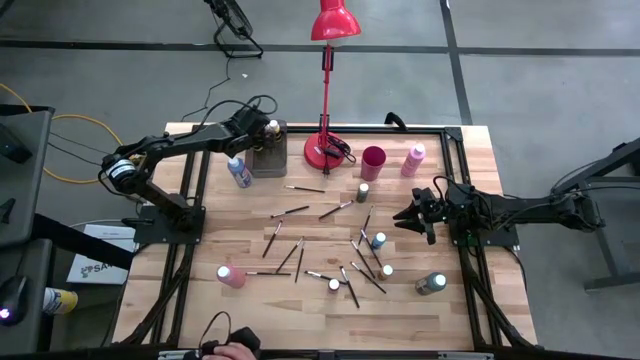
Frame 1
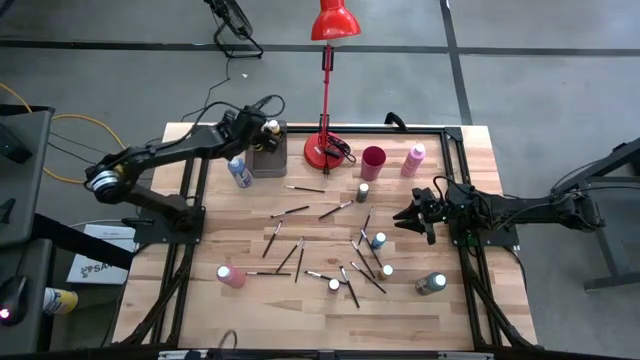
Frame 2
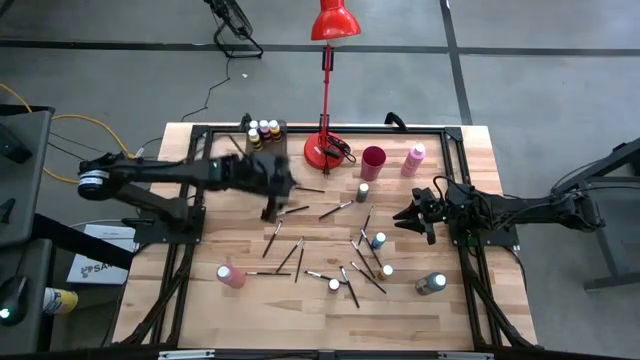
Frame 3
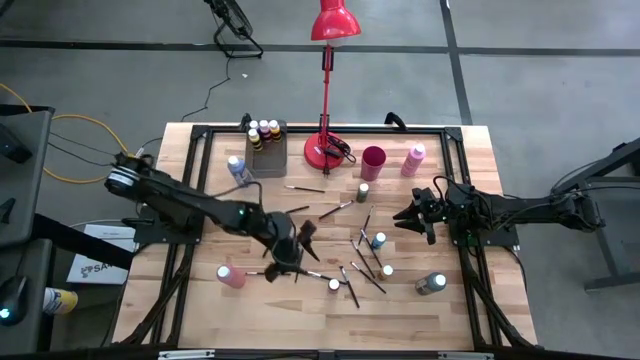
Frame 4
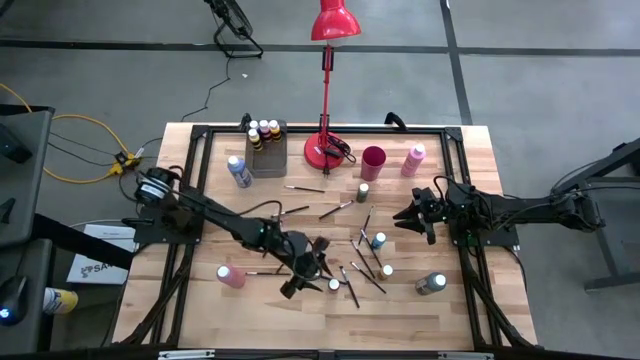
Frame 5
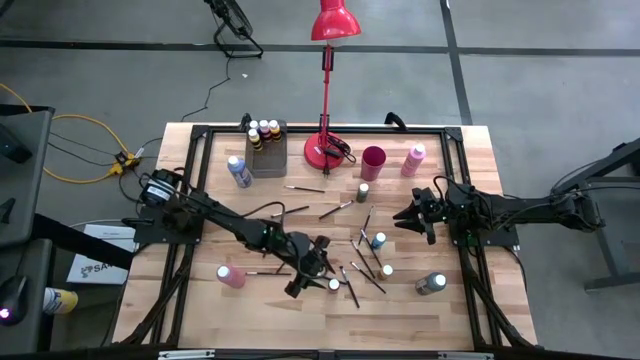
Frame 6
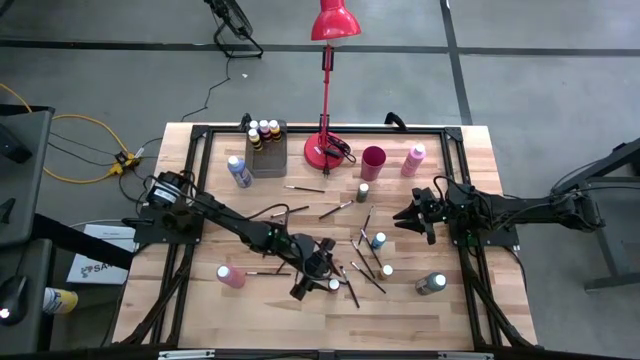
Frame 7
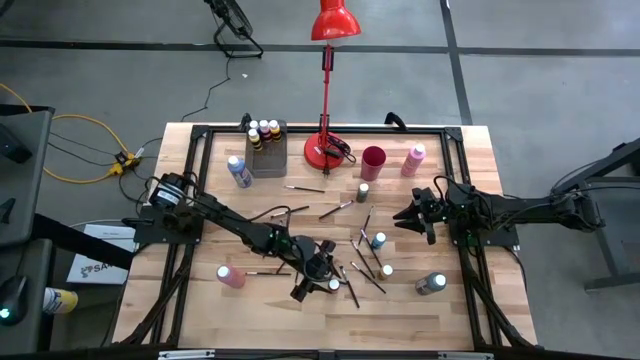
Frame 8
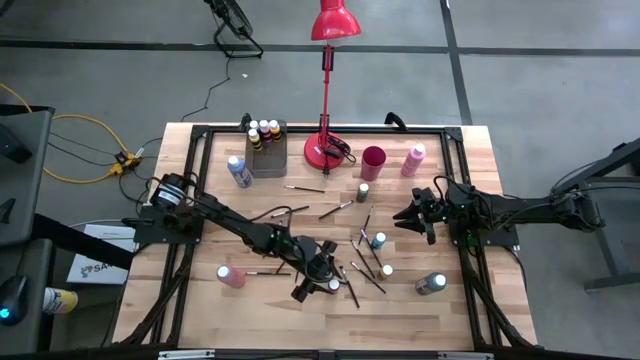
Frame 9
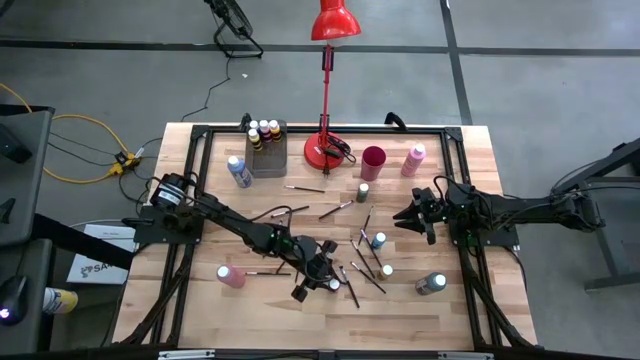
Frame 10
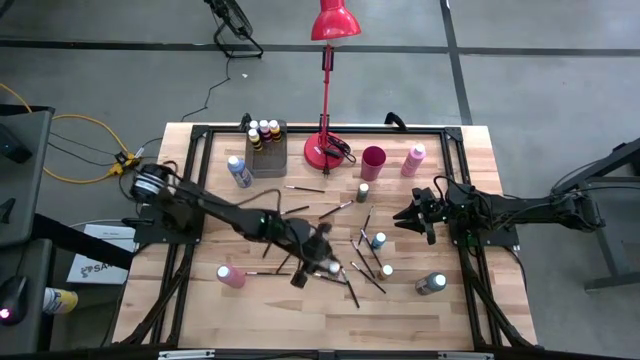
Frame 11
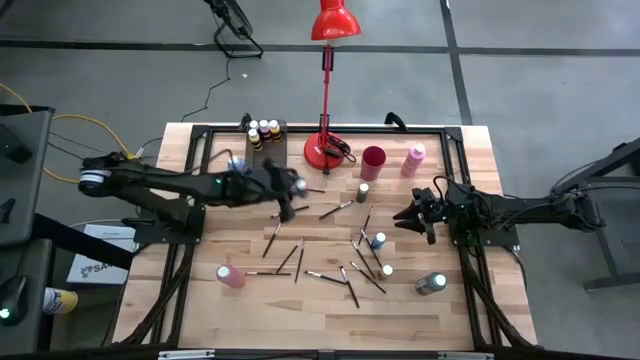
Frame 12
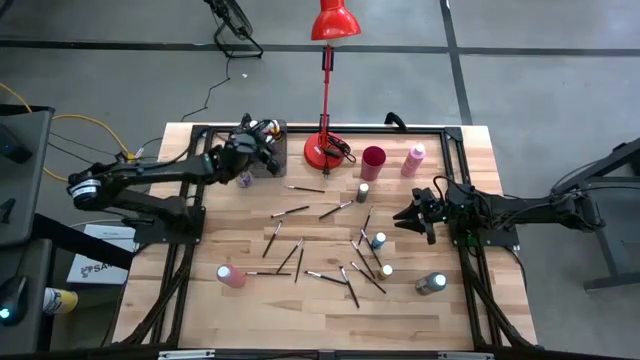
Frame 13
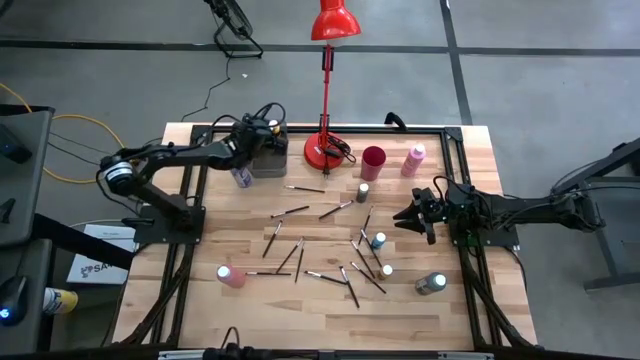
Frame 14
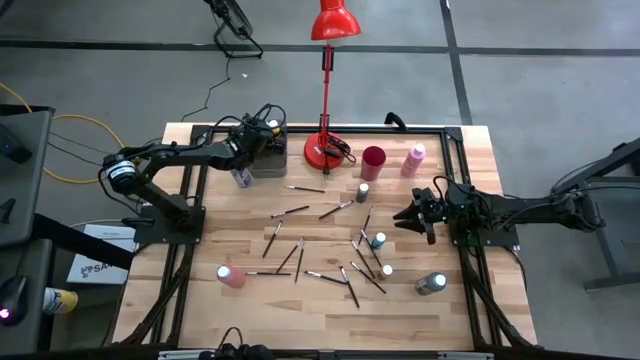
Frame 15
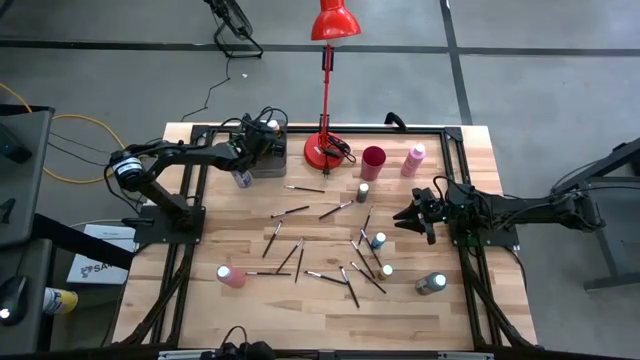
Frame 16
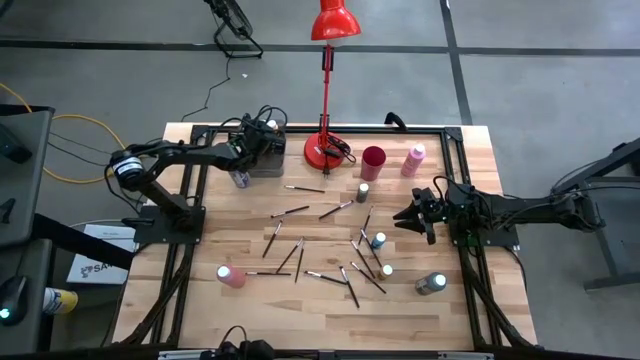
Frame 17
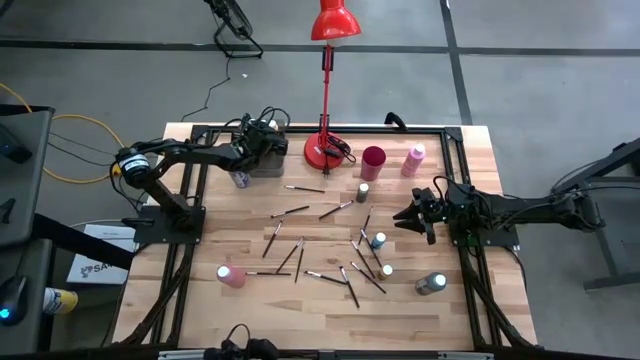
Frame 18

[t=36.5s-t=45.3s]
Task: Pick & Place Paint Supplies
Put the small red black paint bottle into the bin

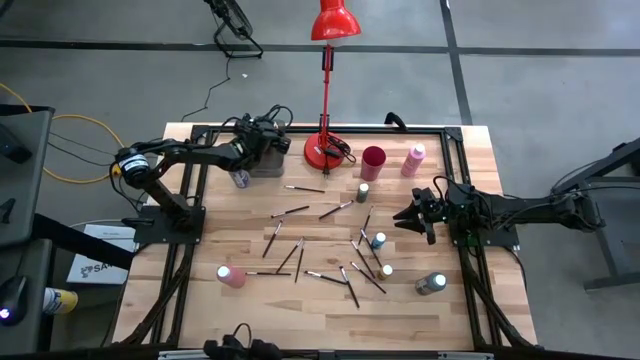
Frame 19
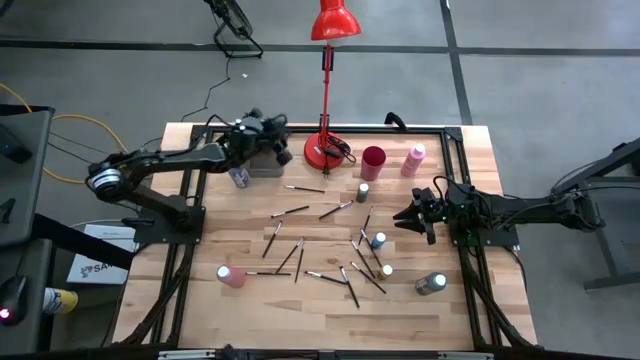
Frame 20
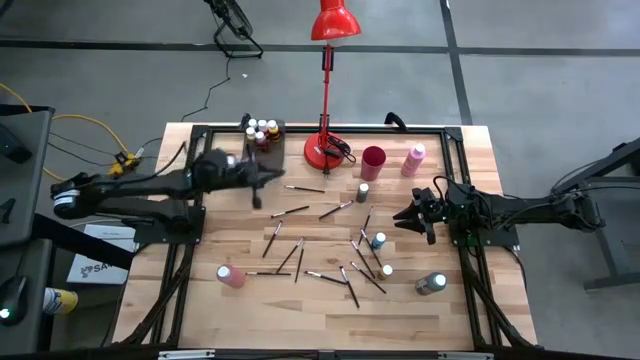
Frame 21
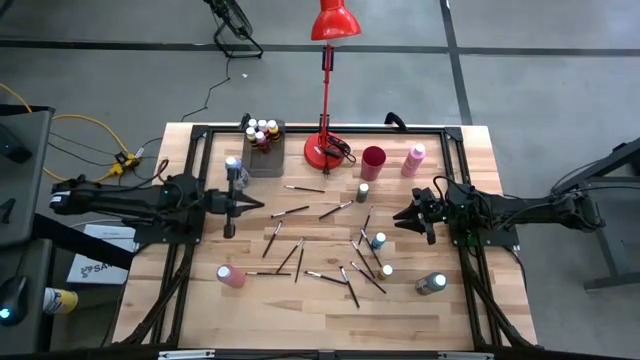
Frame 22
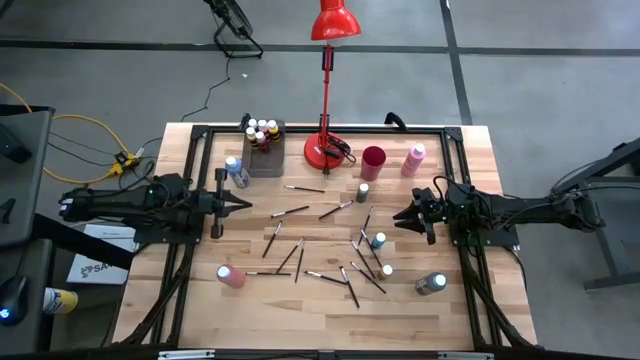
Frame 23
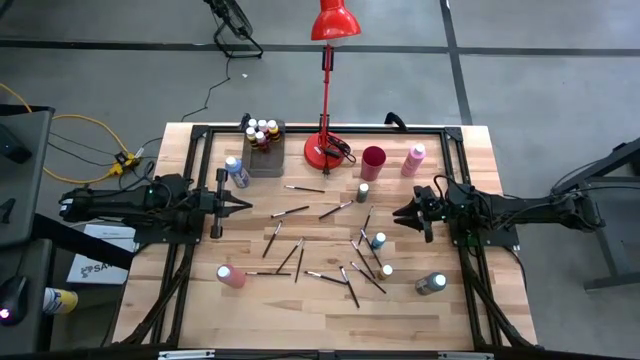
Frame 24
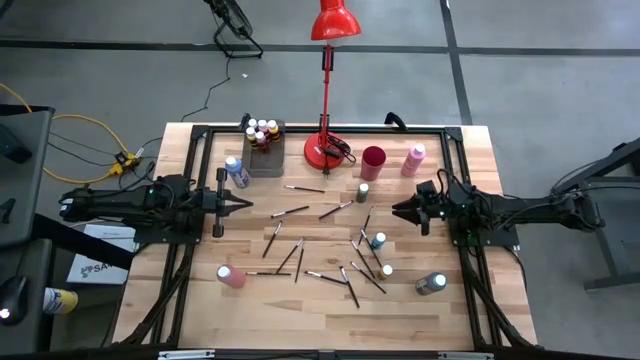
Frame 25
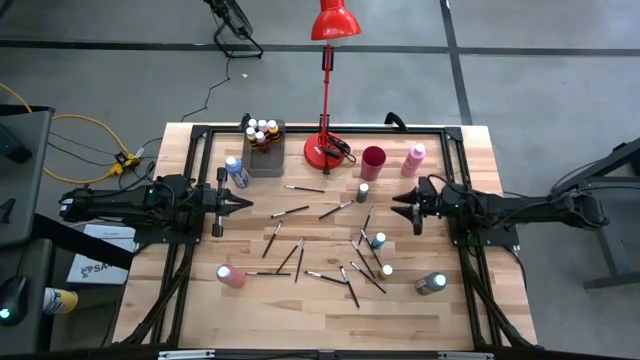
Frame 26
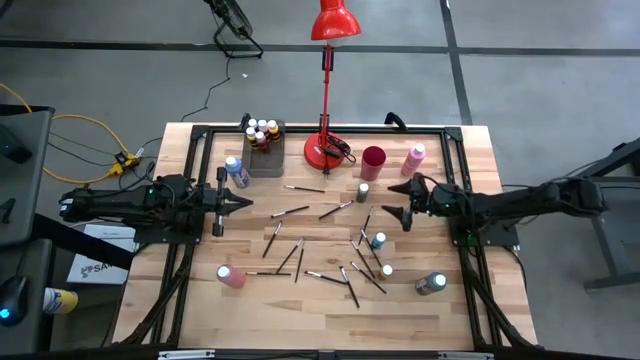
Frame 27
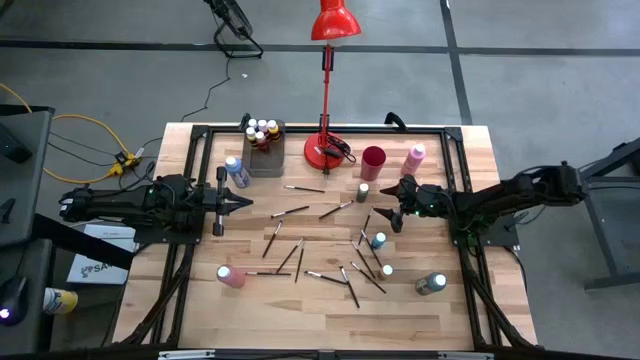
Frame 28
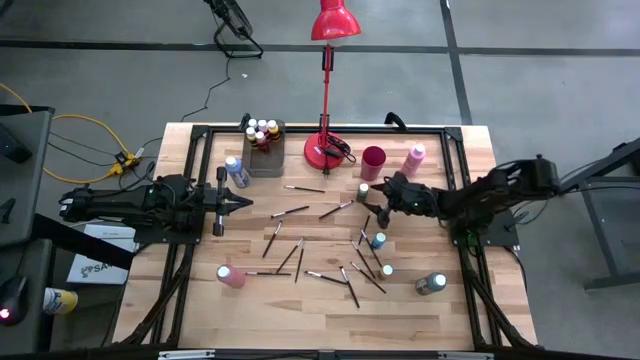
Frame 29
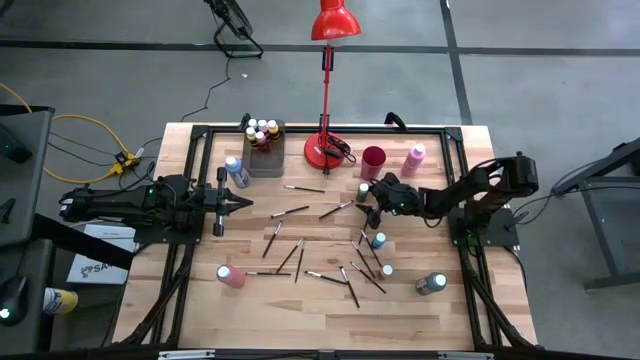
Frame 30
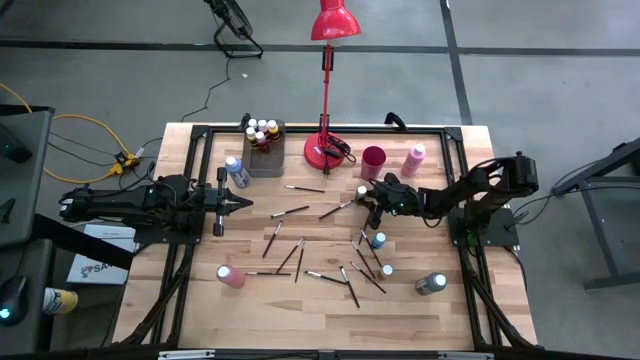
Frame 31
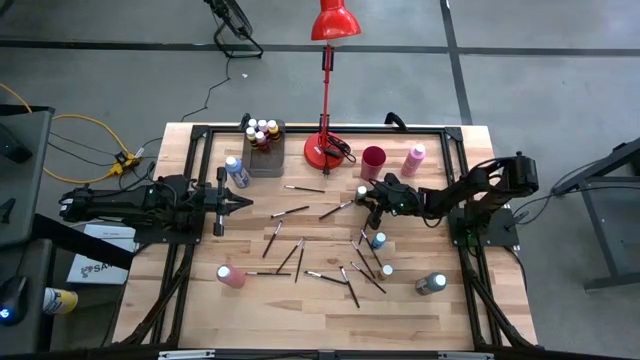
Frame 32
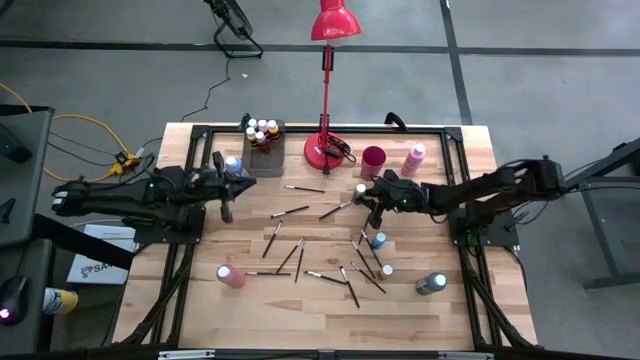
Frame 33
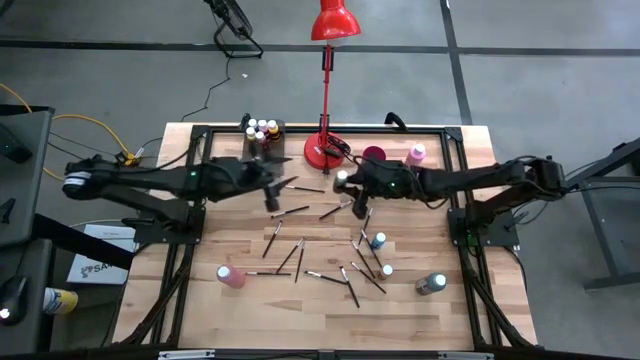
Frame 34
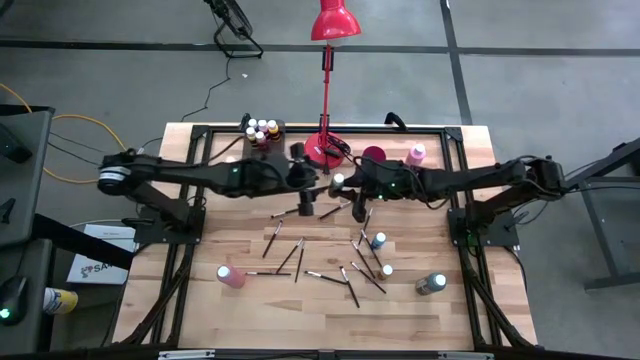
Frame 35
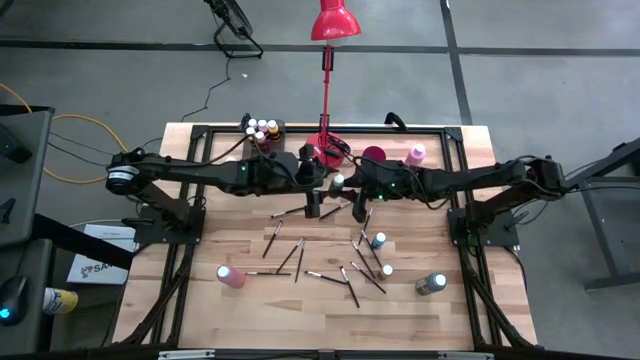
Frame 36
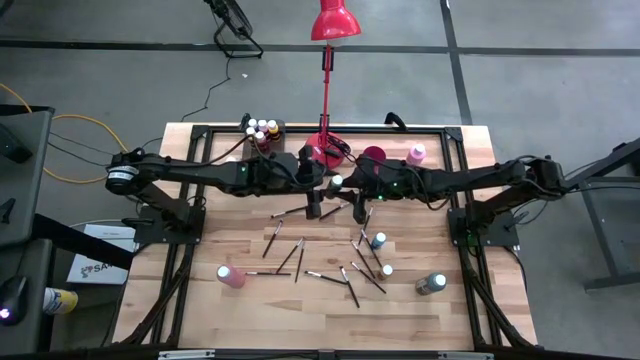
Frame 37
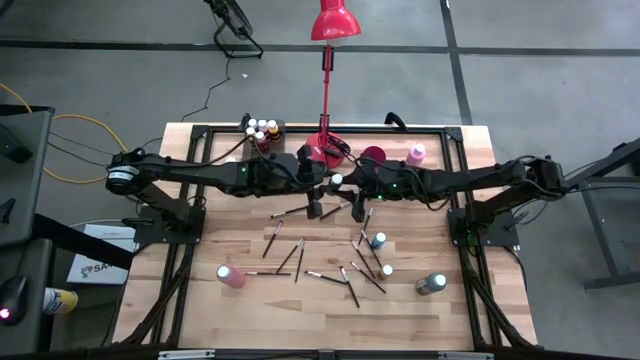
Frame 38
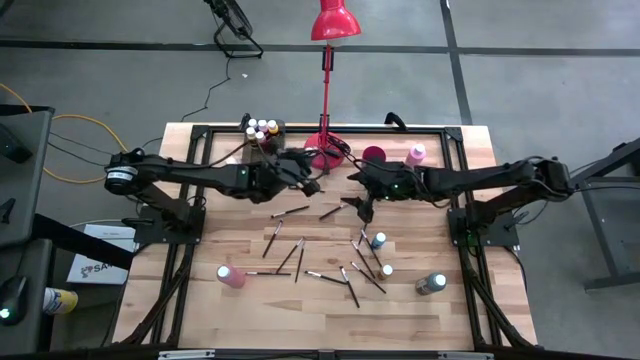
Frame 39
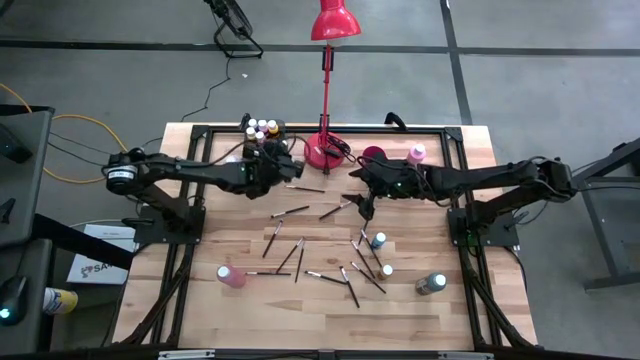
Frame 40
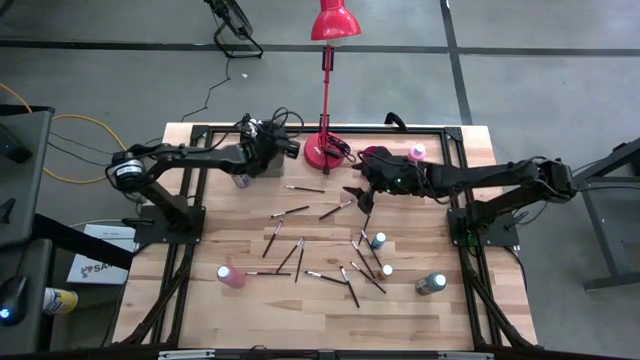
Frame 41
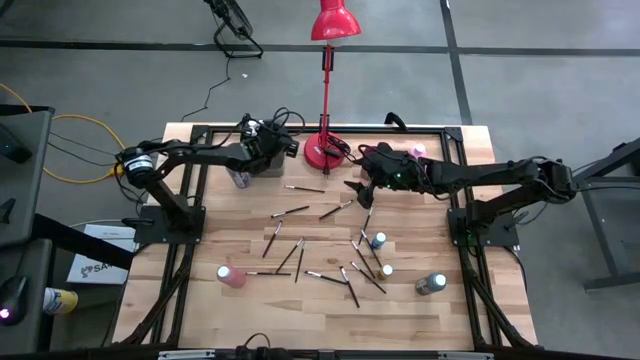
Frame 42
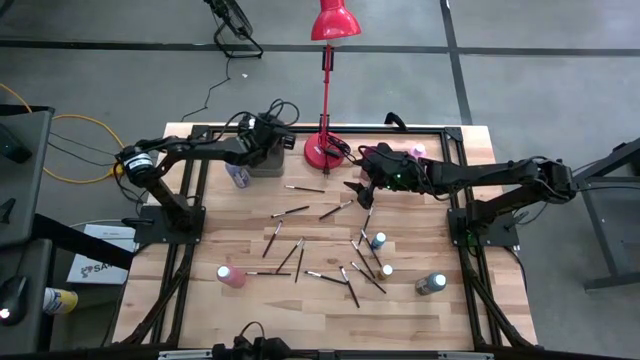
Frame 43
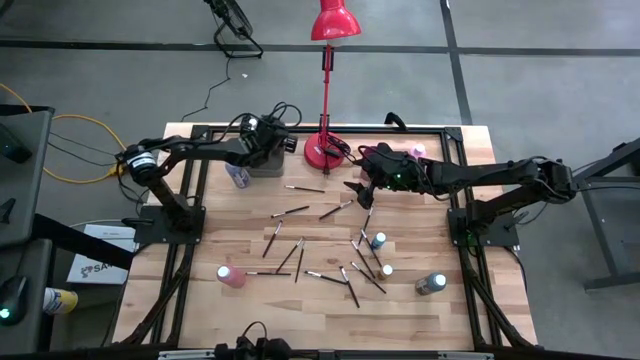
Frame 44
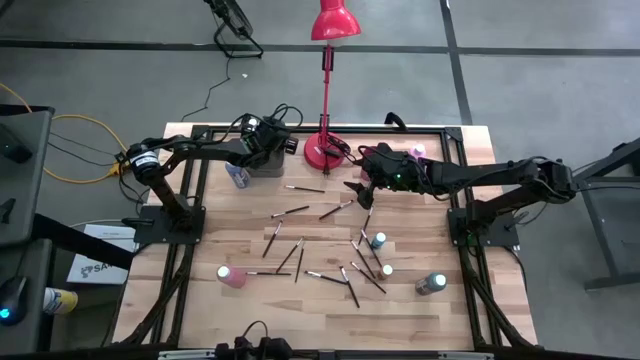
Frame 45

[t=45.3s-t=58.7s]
Put the small green black paint bottle into the bin
